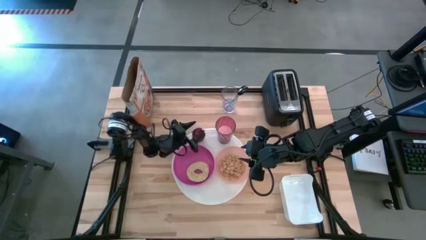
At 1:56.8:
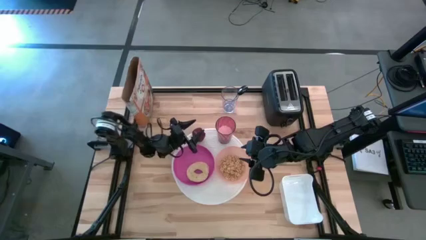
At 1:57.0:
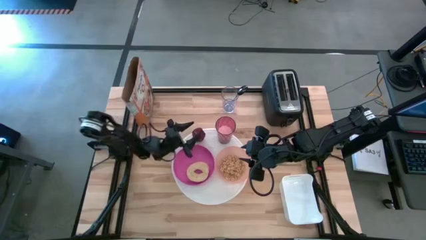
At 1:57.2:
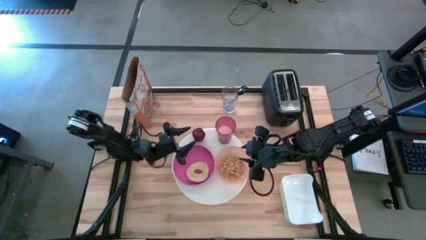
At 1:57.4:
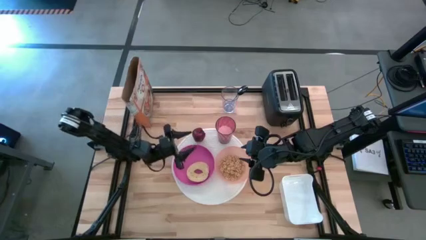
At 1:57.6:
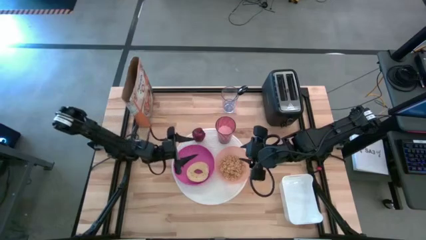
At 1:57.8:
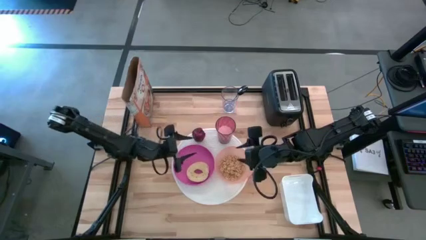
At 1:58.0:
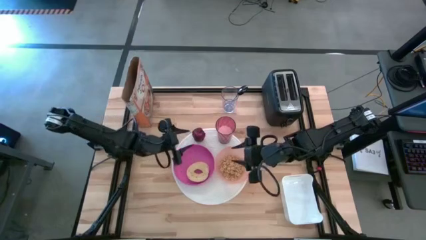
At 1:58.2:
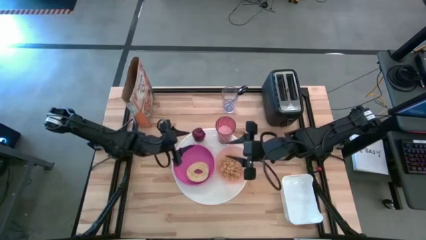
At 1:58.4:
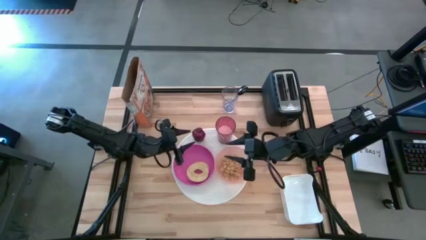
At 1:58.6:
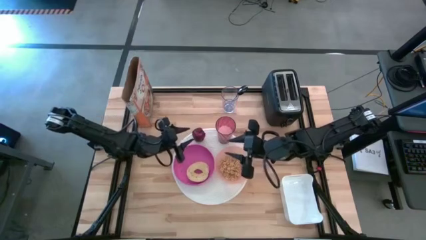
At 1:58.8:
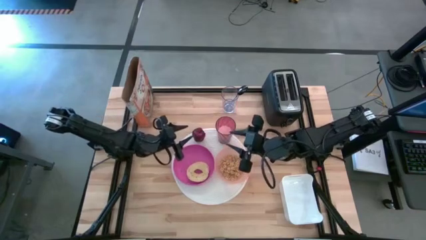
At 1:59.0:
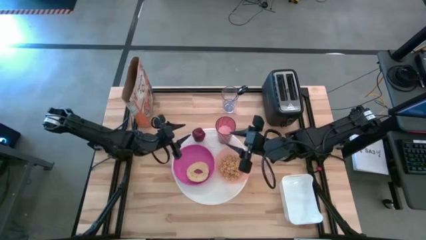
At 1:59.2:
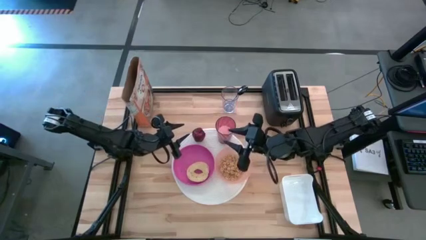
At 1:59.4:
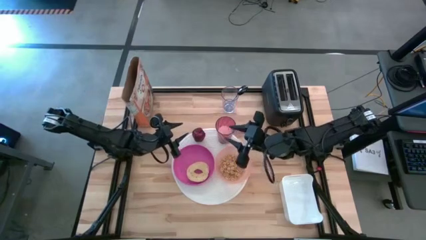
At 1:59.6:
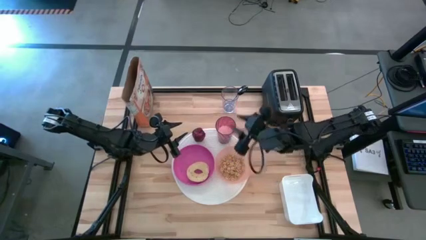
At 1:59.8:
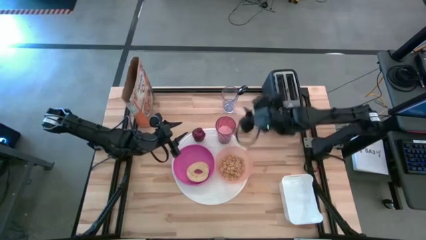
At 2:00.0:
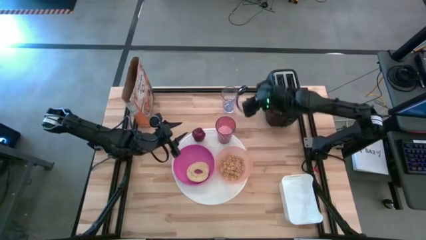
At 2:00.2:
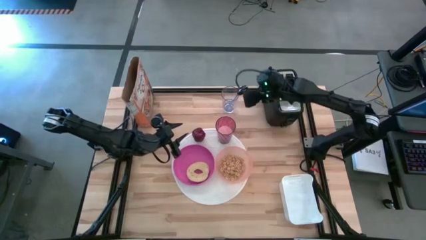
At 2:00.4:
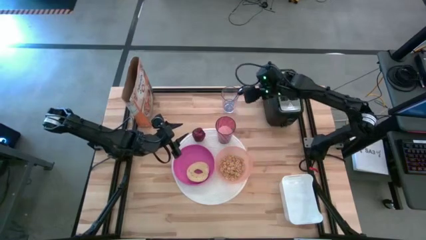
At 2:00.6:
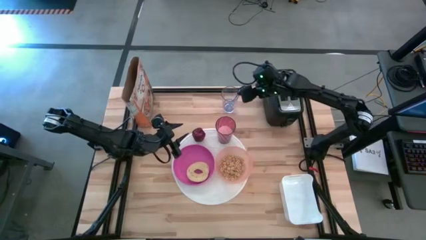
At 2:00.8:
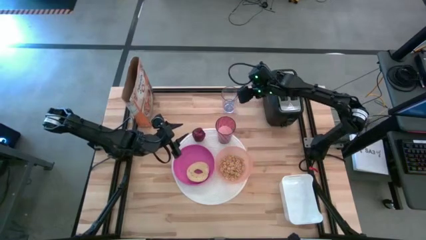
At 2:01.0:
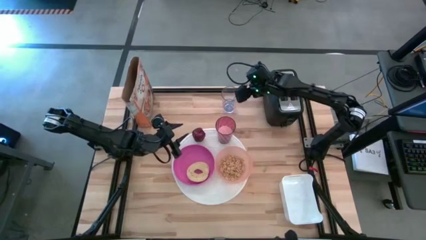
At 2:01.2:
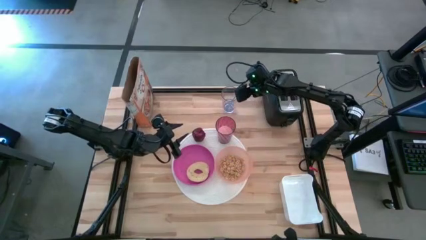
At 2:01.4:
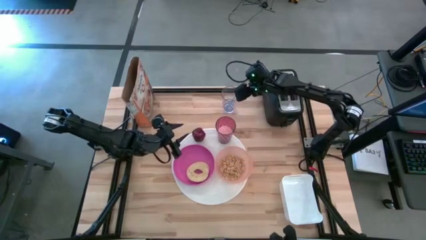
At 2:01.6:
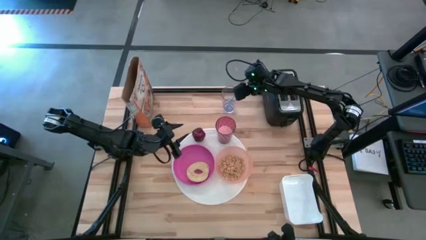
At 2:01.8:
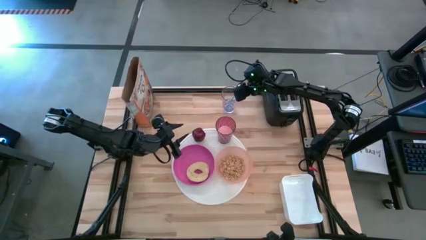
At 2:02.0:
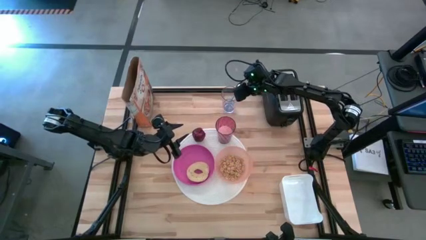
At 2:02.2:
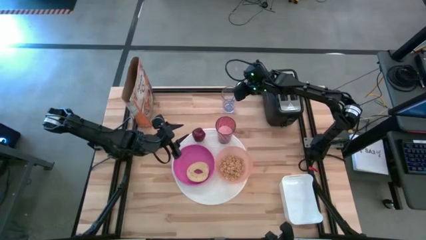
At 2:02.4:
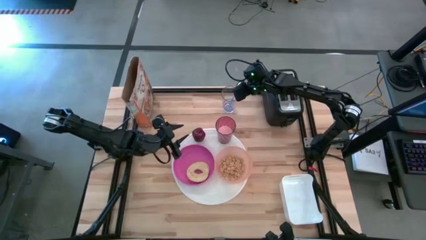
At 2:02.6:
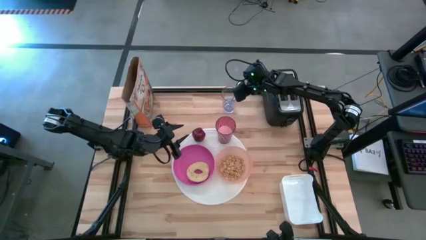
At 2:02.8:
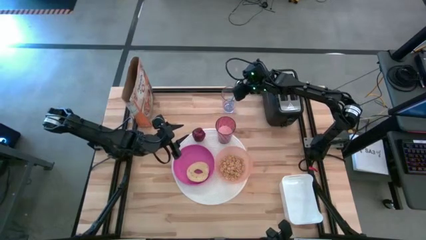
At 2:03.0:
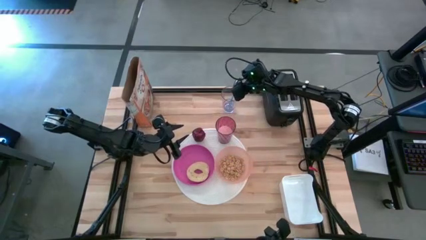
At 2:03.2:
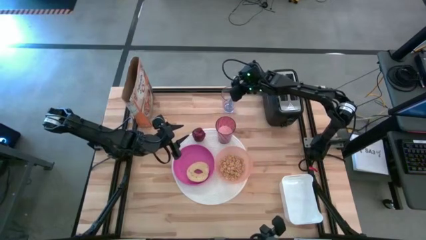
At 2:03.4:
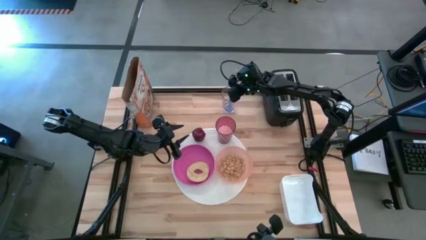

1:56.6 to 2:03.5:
Task: Arrange a breakfast setting
Put the blue spoon from the transparent cup to the right of the orange bowl

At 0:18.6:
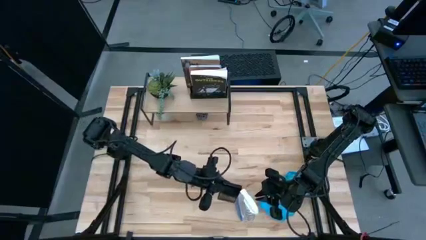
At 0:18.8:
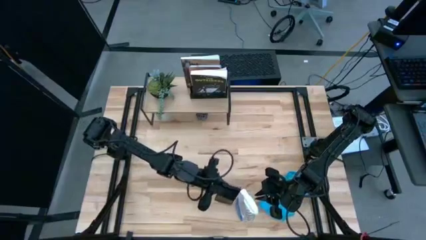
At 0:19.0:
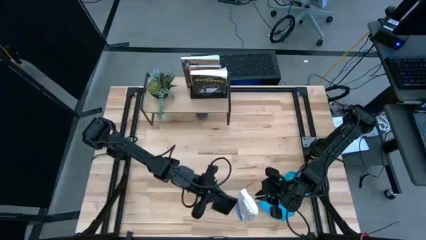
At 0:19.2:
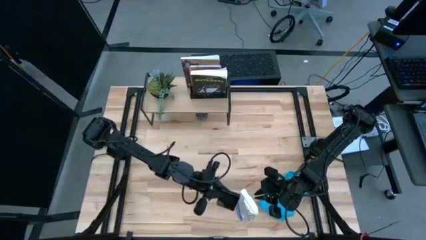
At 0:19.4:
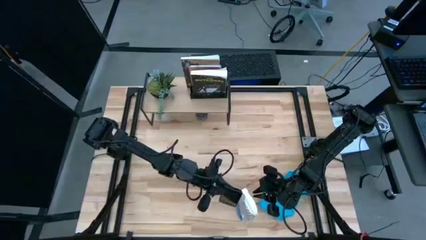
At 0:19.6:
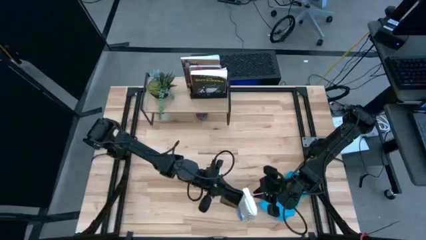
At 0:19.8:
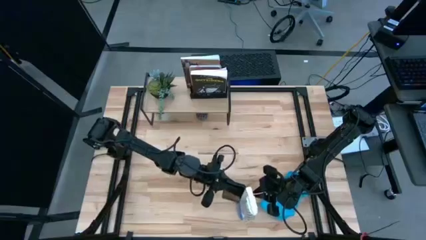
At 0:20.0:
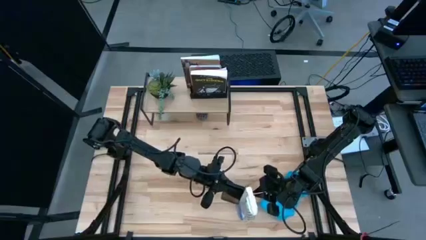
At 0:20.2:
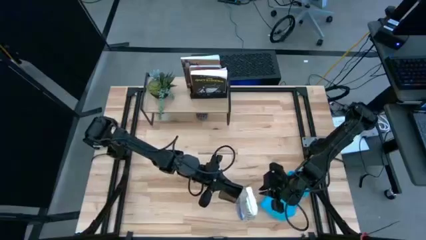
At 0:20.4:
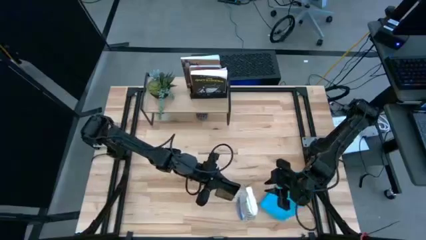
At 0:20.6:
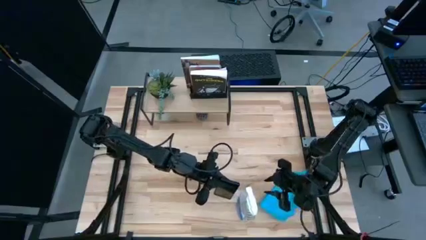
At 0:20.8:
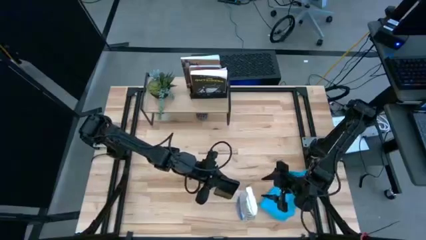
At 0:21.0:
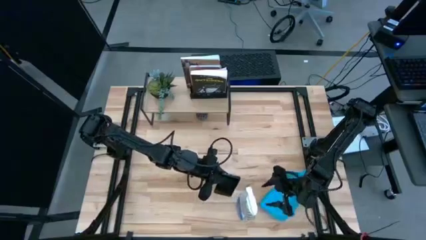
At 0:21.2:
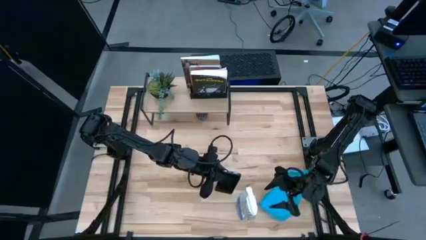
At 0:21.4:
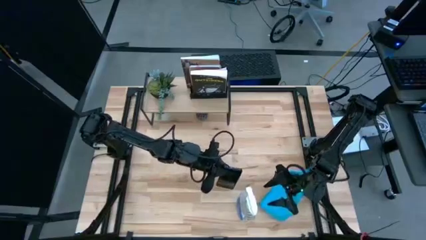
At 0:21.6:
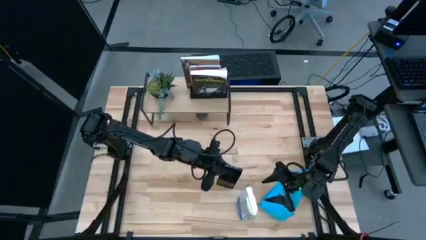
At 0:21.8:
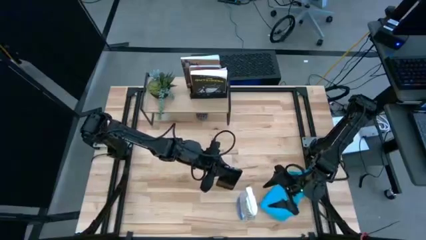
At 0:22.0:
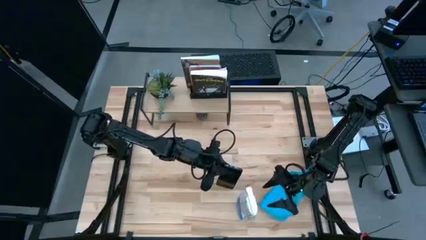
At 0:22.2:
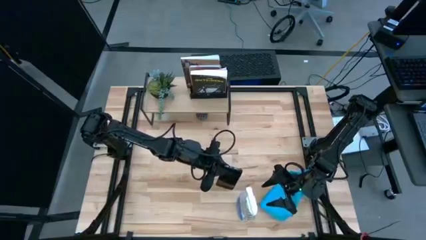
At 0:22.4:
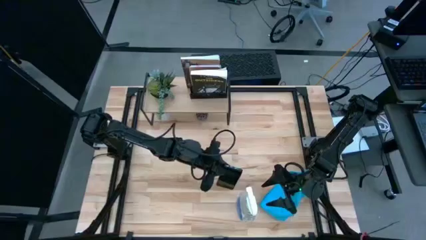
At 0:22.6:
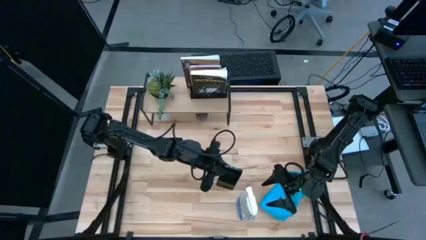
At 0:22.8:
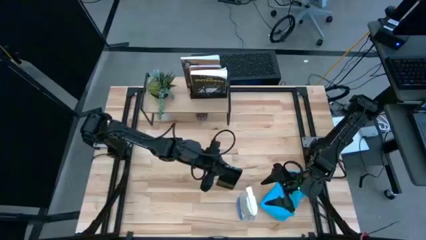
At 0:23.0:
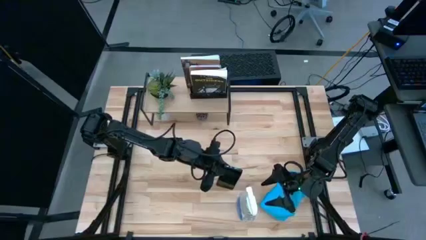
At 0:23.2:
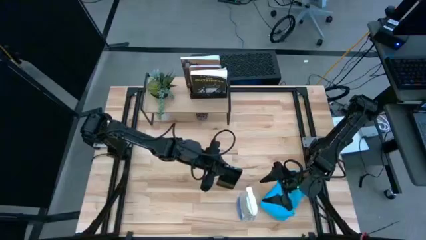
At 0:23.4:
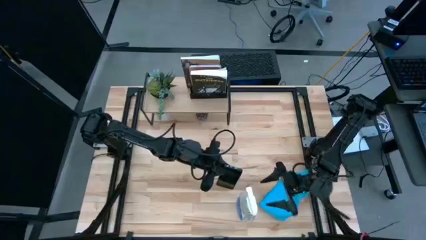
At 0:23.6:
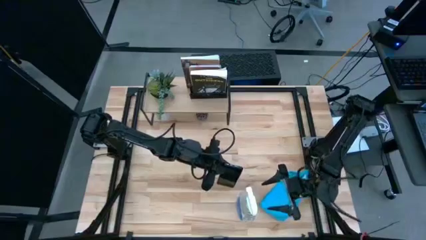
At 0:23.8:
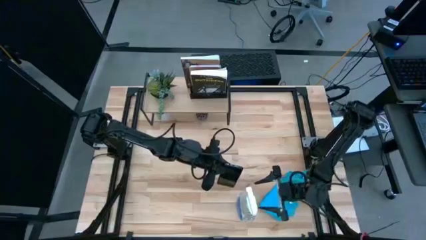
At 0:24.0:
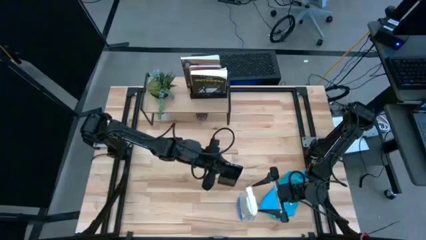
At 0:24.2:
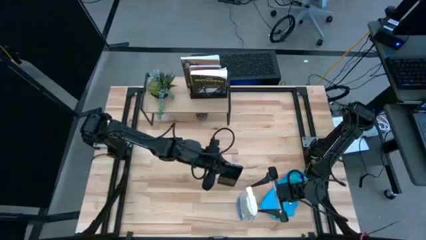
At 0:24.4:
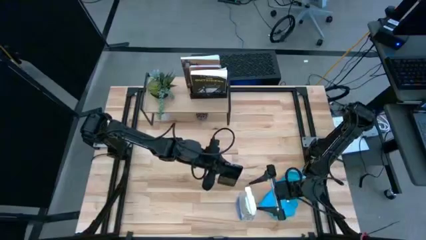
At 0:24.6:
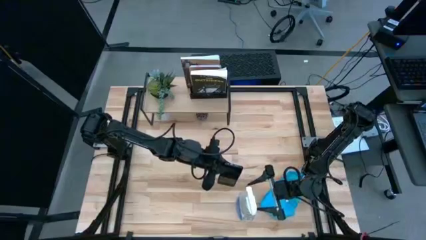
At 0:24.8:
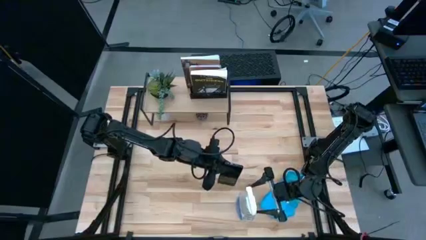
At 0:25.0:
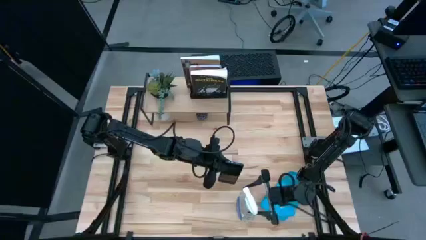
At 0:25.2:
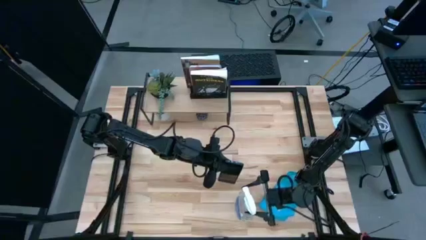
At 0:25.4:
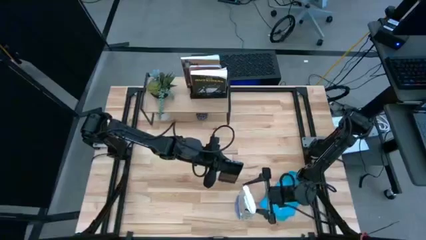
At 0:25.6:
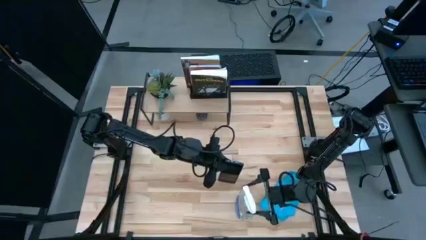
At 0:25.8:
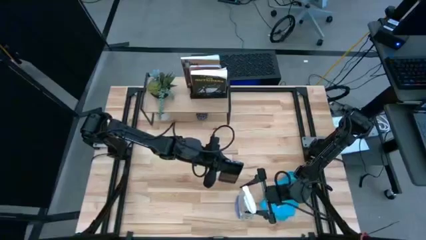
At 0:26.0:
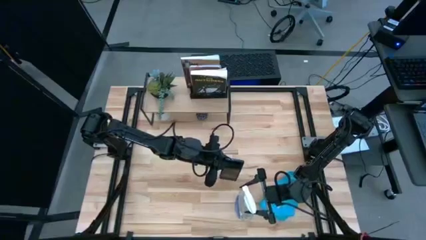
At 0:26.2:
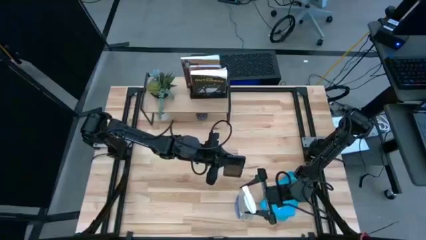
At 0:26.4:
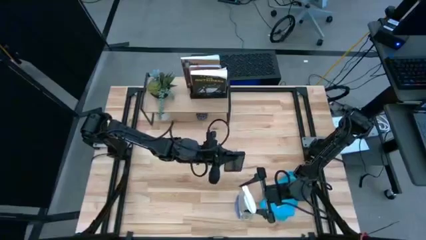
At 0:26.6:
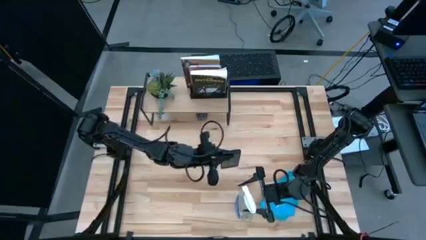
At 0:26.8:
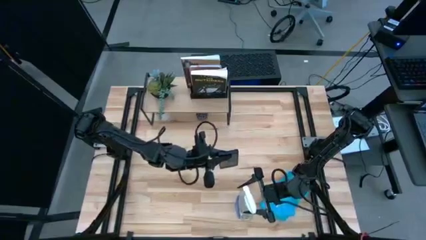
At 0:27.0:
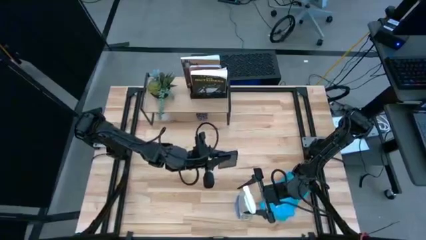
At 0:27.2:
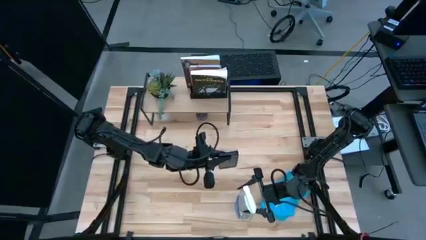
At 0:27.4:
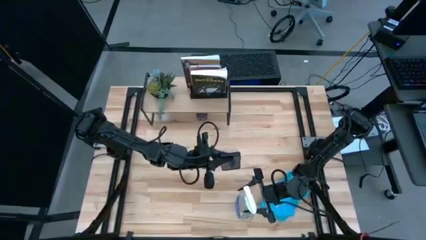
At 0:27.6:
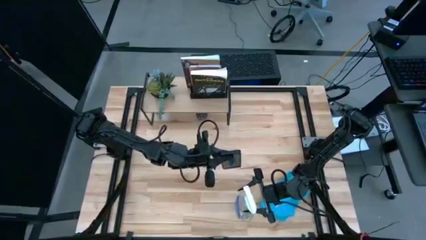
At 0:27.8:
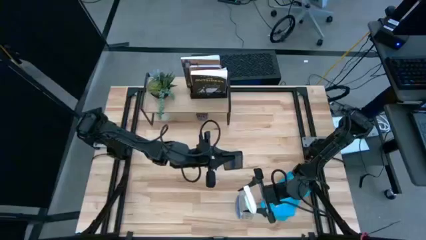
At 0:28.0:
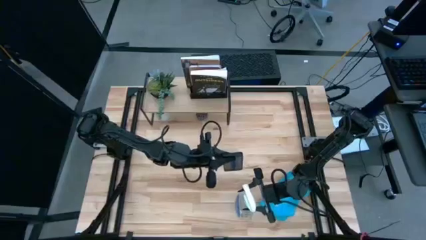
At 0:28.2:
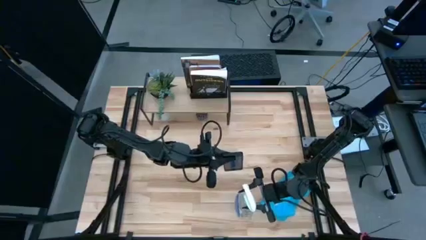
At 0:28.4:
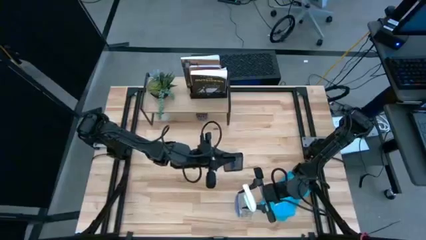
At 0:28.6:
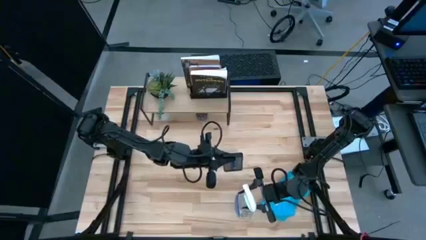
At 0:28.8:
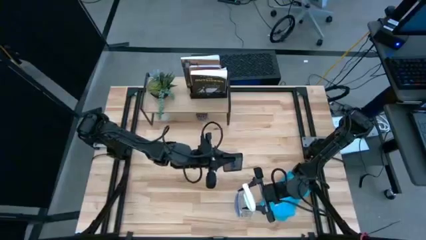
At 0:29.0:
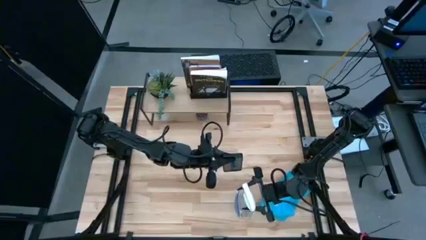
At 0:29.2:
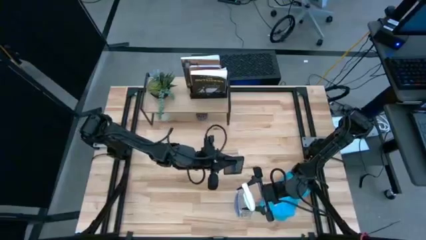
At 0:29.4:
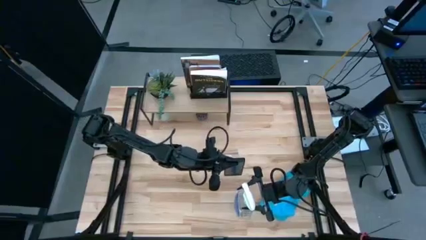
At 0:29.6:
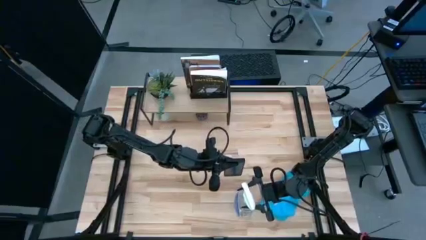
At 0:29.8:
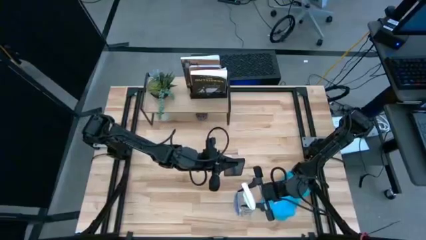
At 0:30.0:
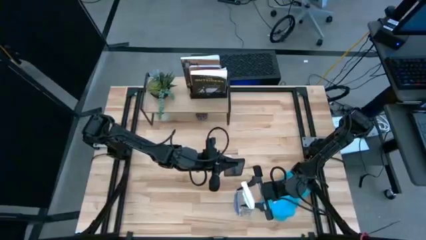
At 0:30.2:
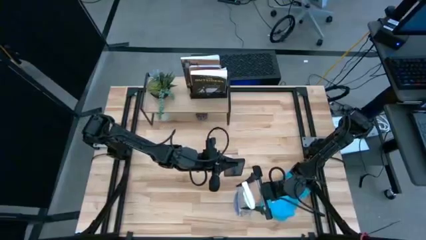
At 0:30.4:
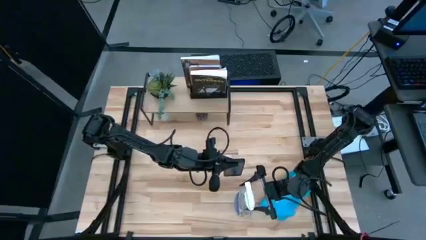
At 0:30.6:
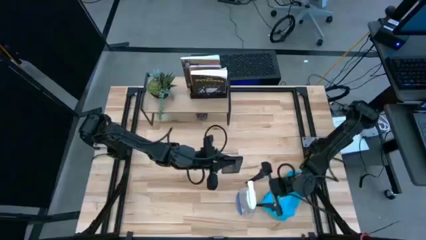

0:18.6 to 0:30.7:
Task: Apply microfiber cloth
Spray the front of the black cellphone using the transparent spray bottle
